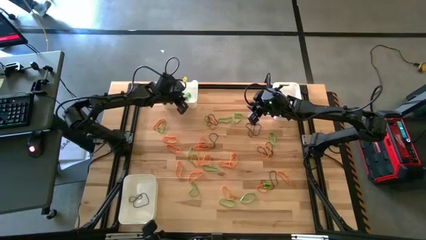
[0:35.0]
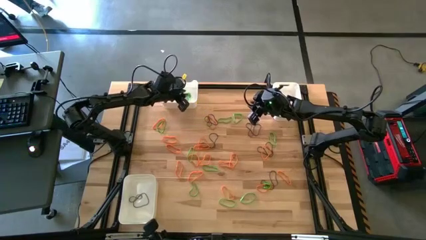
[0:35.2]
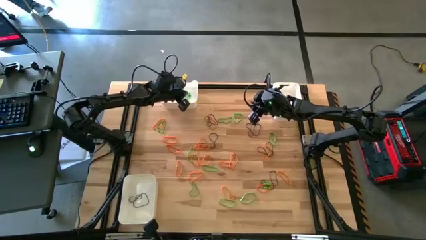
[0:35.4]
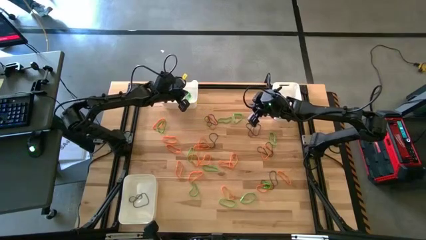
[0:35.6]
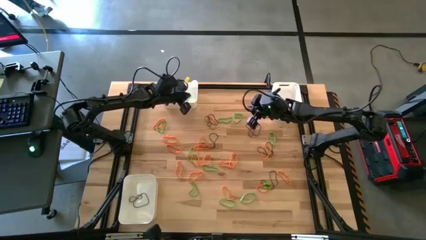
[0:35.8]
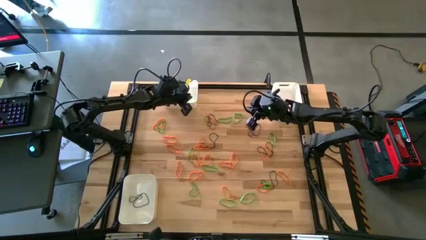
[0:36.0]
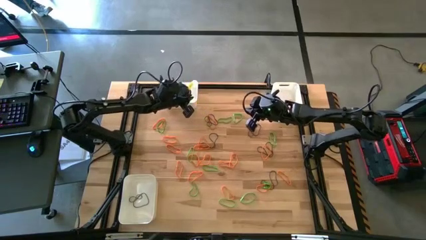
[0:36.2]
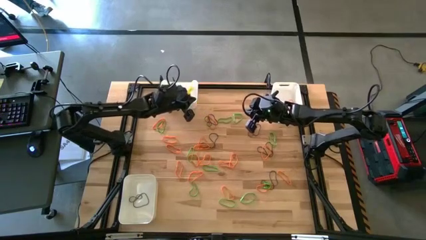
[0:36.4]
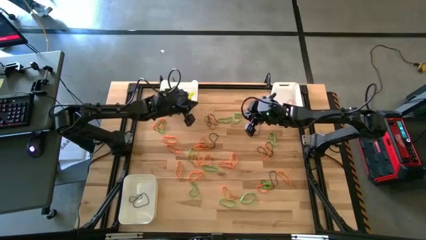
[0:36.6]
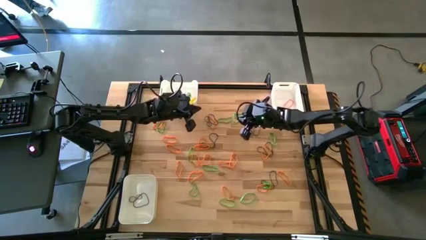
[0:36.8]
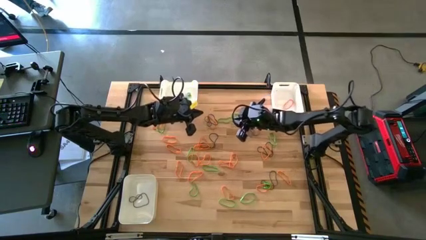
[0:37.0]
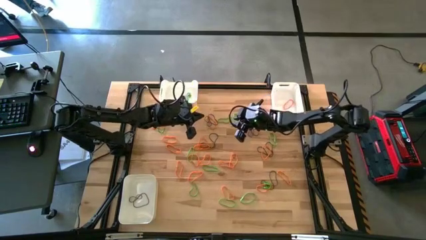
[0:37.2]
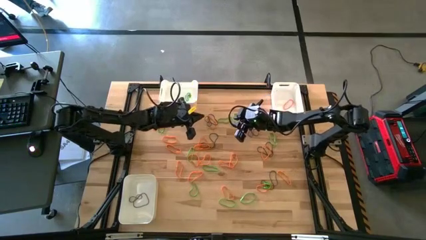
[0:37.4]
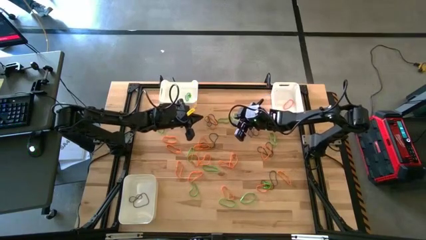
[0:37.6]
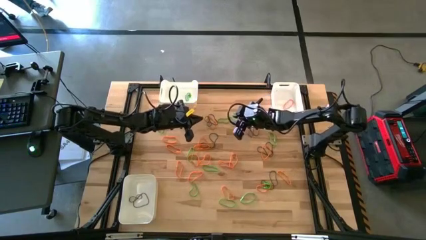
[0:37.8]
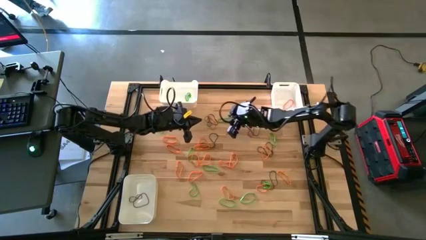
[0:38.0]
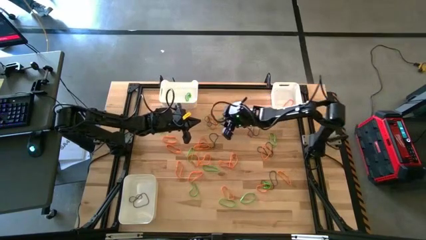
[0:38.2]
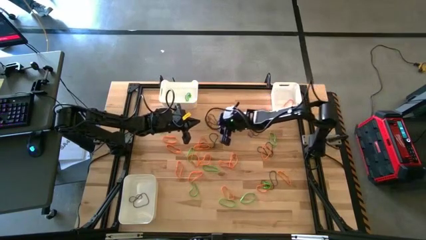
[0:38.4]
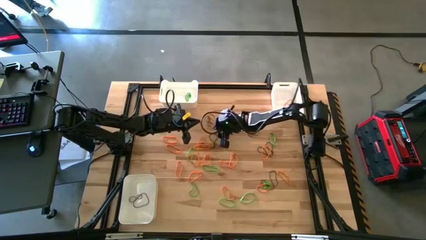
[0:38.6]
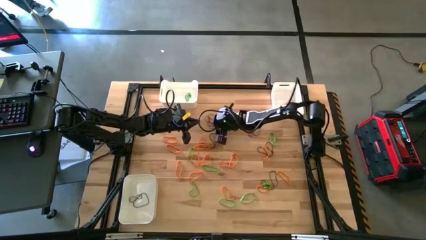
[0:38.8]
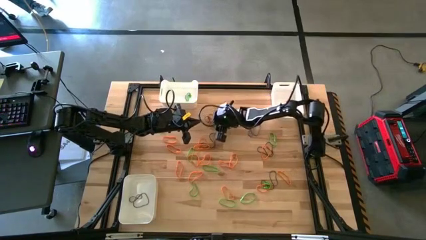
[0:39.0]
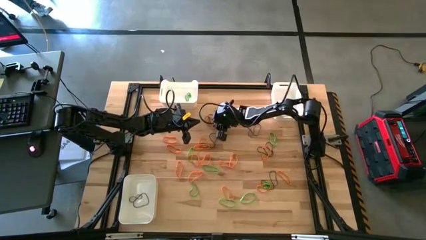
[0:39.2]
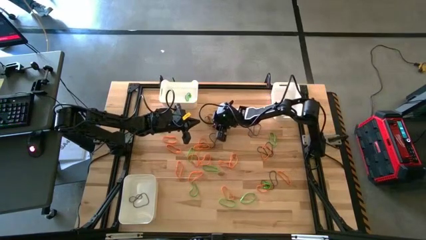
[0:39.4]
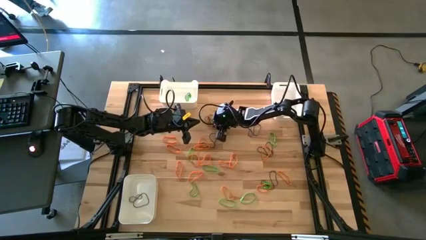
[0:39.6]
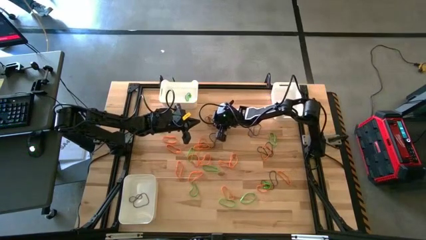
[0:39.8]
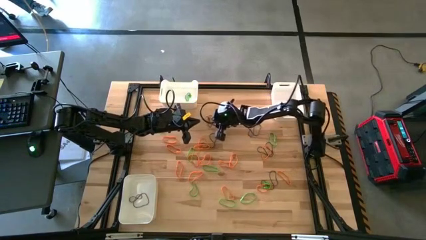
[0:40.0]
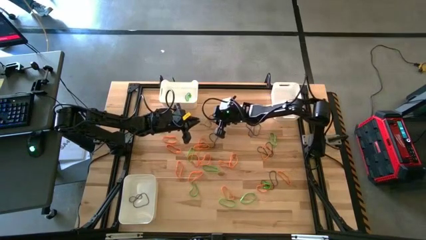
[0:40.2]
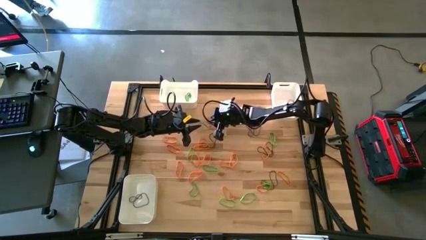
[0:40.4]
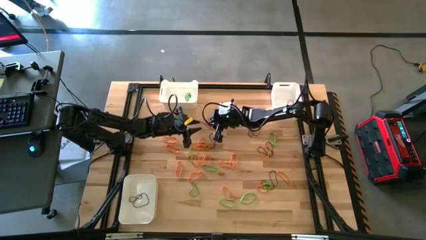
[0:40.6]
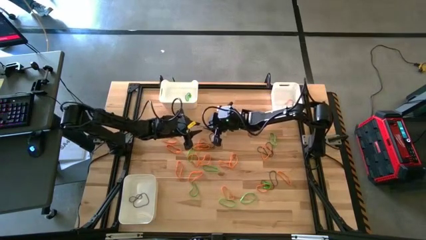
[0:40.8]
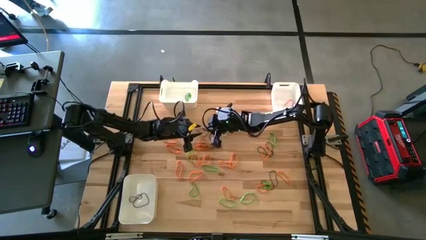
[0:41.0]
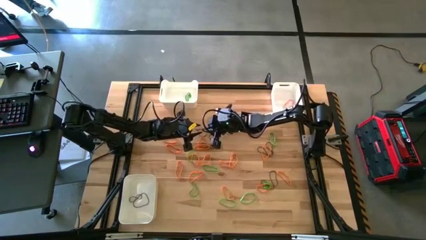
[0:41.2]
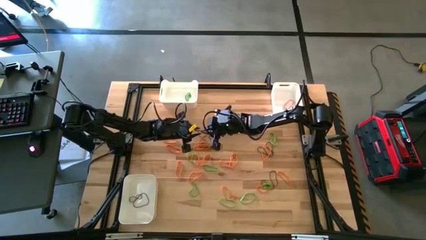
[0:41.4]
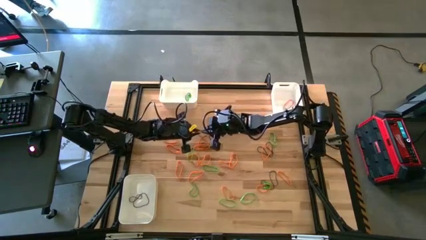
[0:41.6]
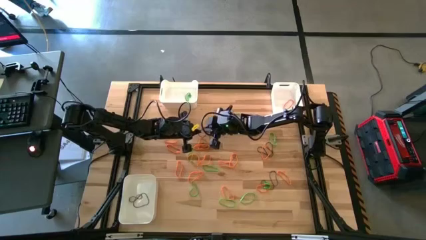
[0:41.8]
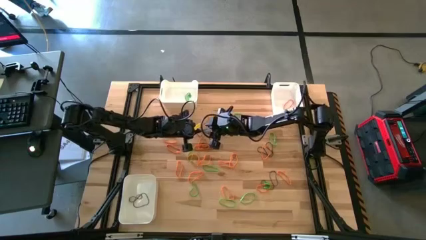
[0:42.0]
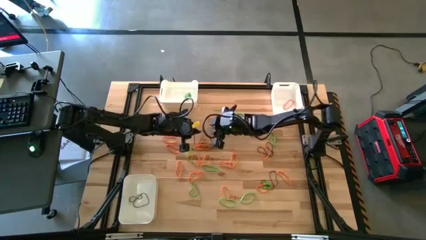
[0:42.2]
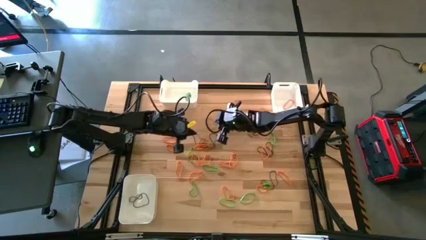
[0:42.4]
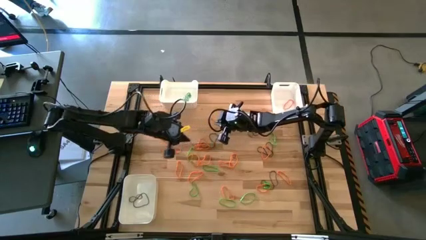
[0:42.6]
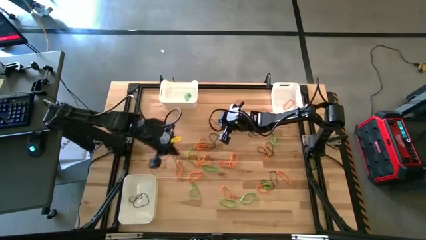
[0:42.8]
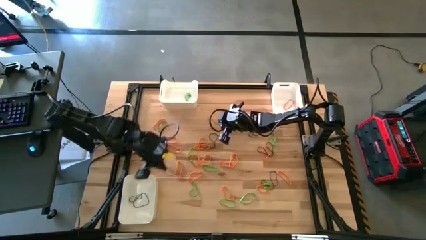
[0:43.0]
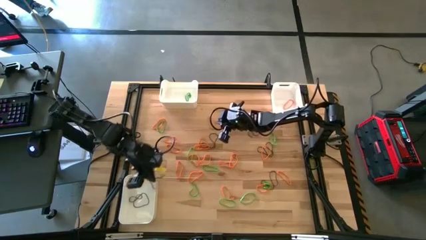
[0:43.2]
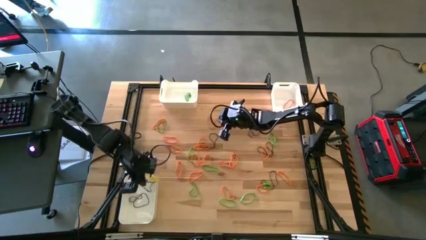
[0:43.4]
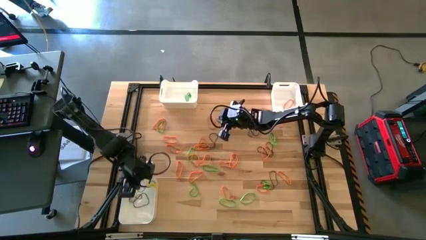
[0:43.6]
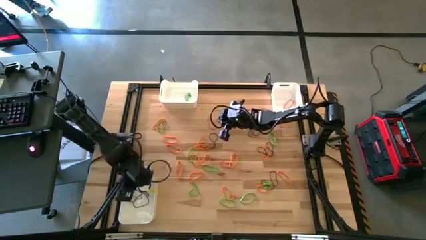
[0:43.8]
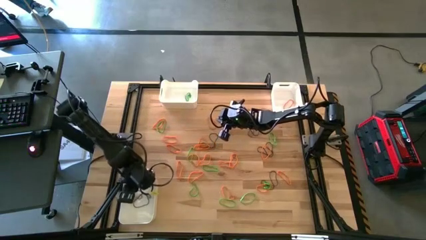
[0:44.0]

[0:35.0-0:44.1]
Task: Sort rubber bands into baskets
Put the purple rubber band into the bottom left white bin

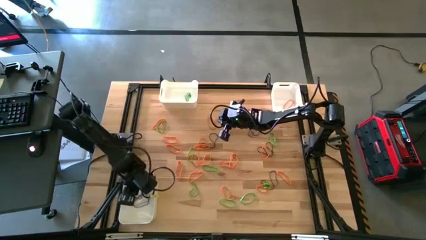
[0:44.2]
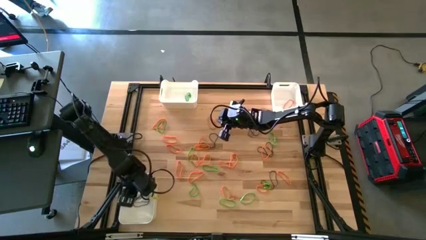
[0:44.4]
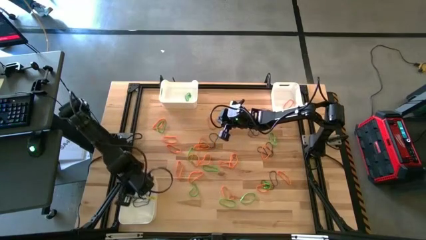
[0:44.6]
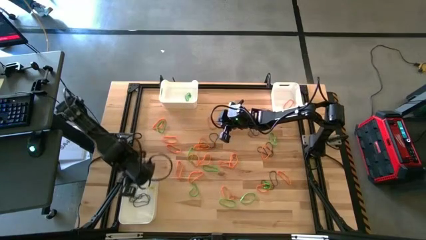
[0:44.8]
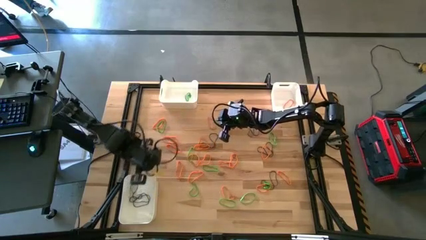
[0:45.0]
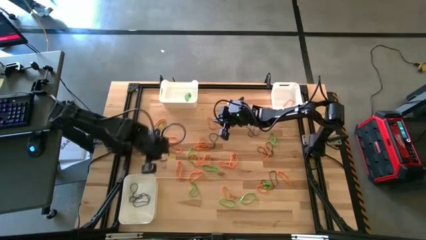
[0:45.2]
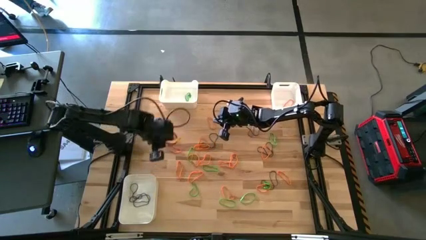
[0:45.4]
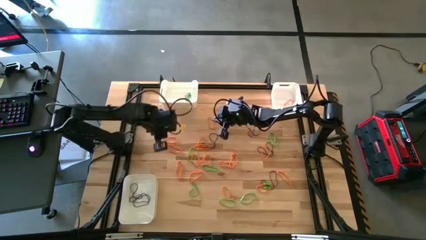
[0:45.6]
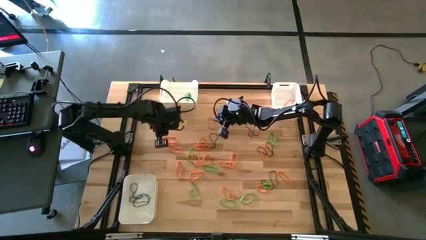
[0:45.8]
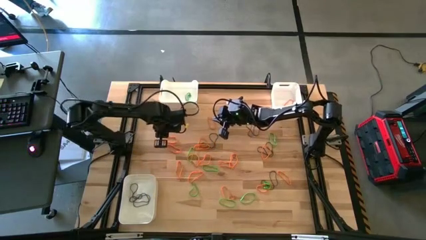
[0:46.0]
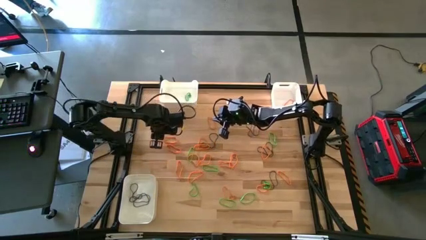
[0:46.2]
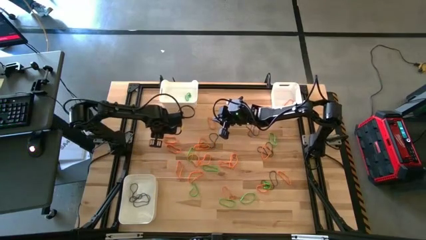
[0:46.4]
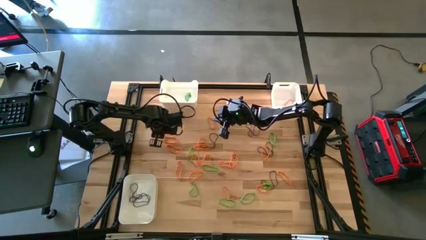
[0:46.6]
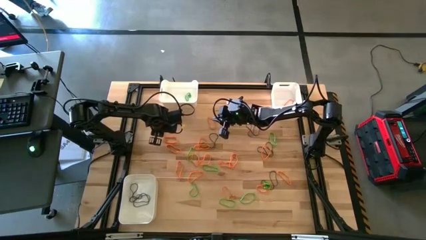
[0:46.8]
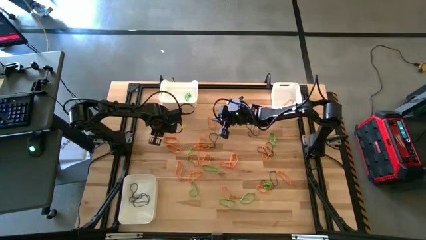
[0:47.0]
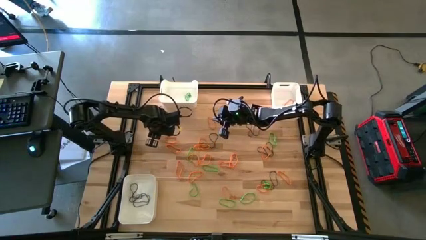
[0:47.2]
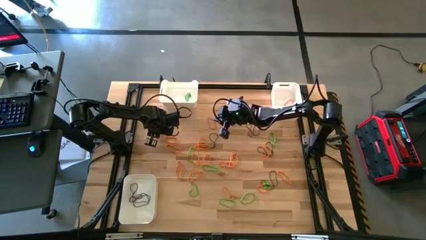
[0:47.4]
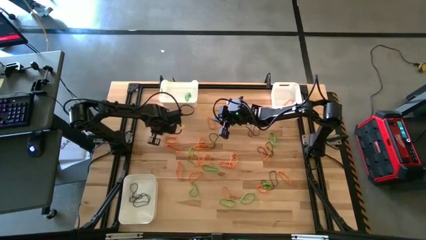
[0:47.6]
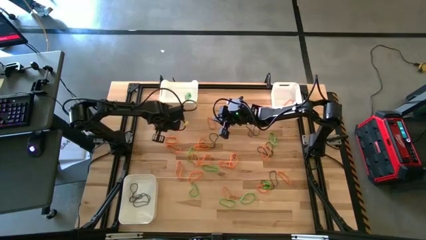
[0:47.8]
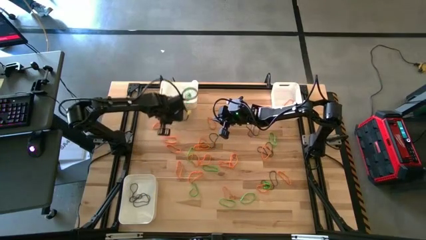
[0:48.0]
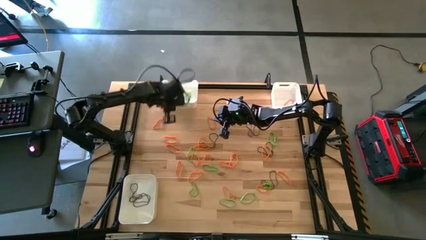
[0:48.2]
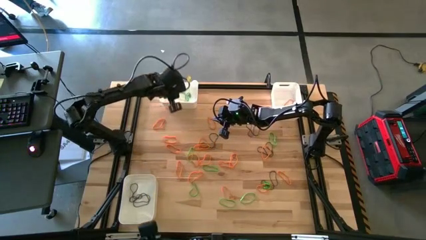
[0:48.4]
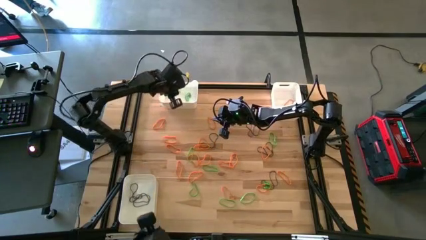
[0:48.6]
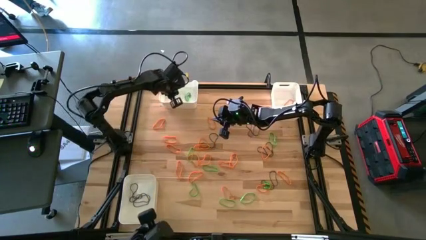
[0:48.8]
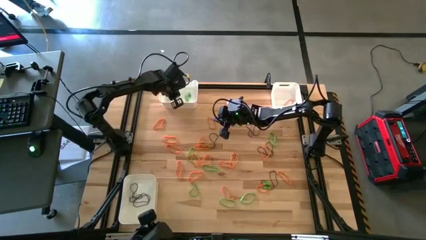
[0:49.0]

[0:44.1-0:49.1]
Put the green rubber band into the top left white bin

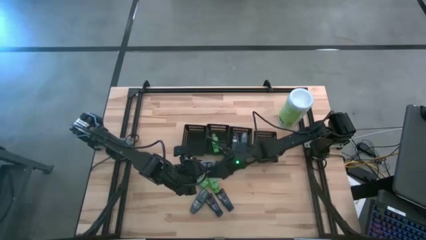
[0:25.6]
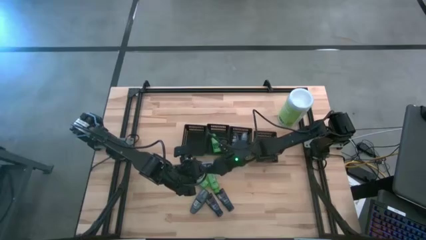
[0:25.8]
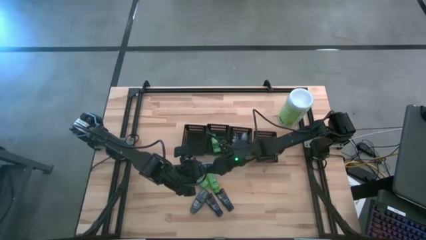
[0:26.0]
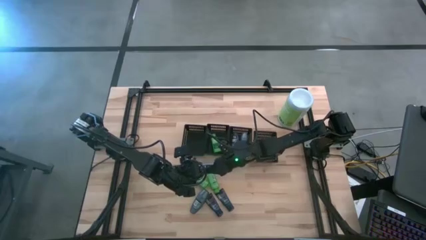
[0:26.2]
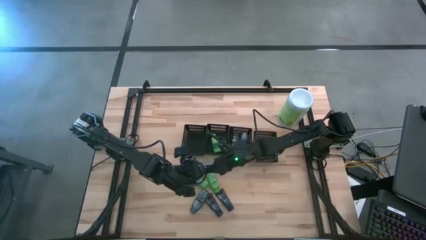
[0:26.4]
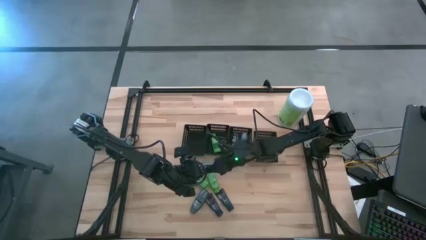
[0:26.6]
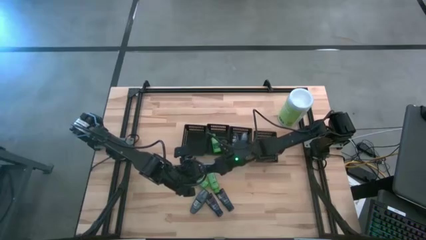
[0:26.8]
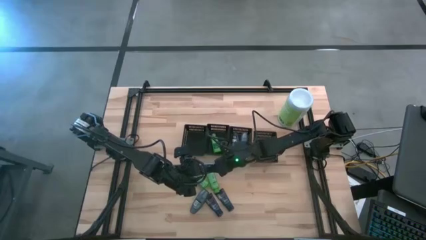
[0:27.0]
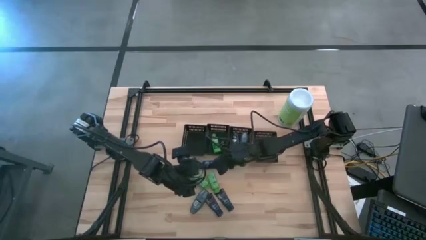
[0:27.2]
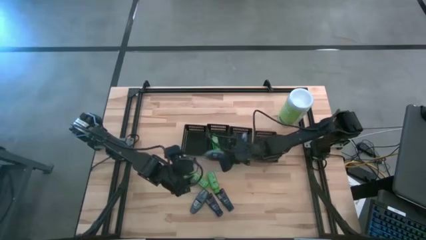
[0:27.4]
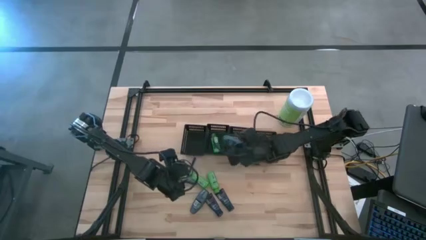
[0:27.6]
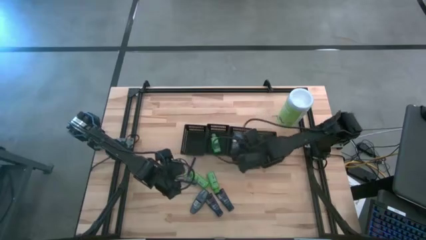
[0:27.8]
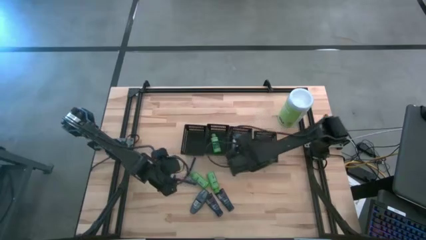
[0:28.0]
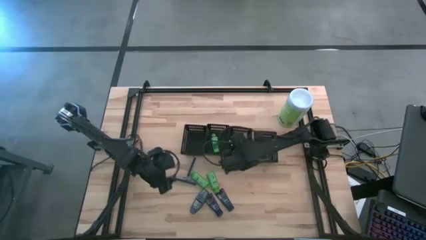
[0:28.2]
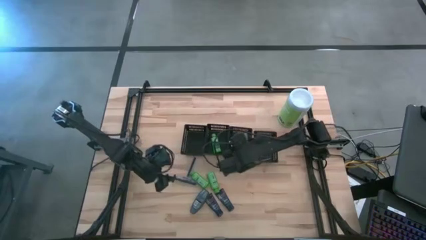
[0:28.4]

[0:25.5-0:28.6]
Task: Pick & Place Travel size toiletries
Put the deodorant into the middle right black bin
